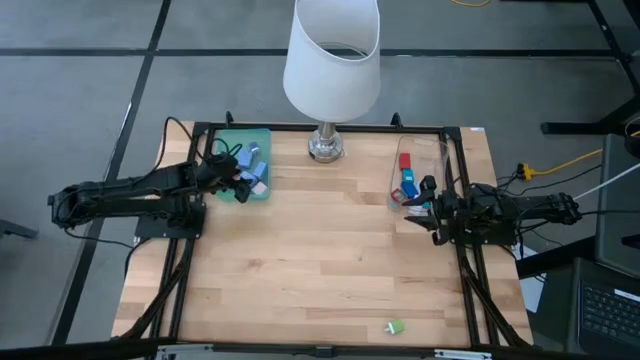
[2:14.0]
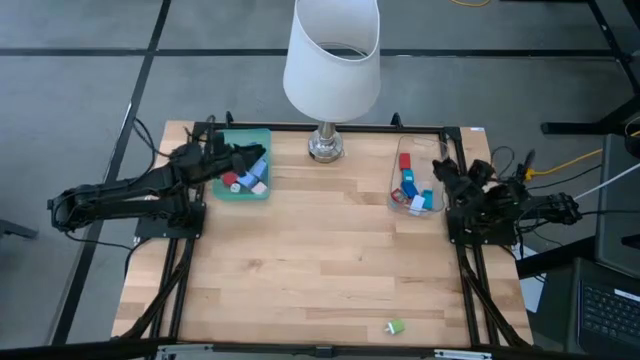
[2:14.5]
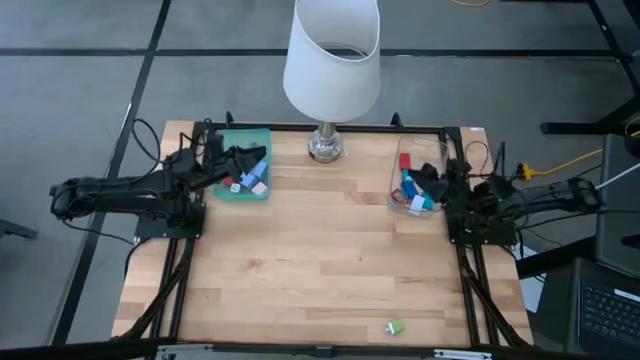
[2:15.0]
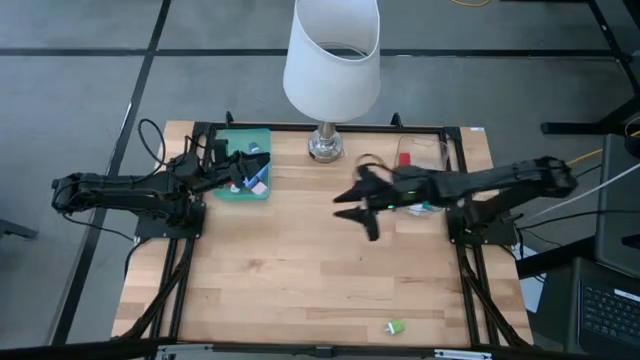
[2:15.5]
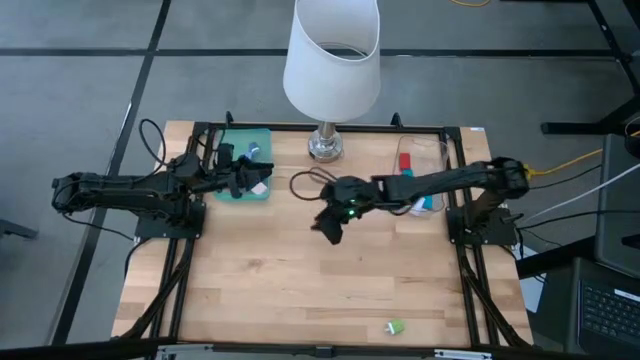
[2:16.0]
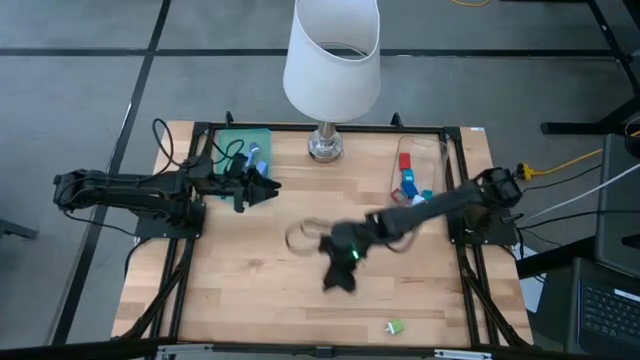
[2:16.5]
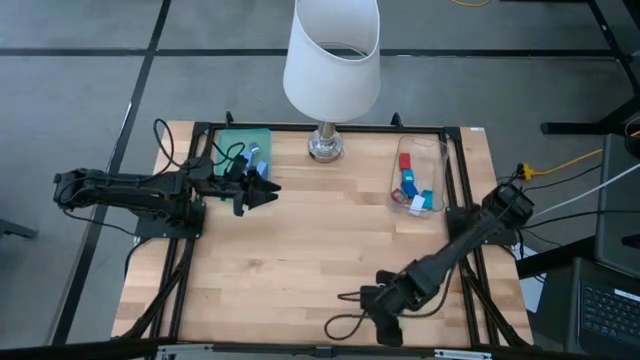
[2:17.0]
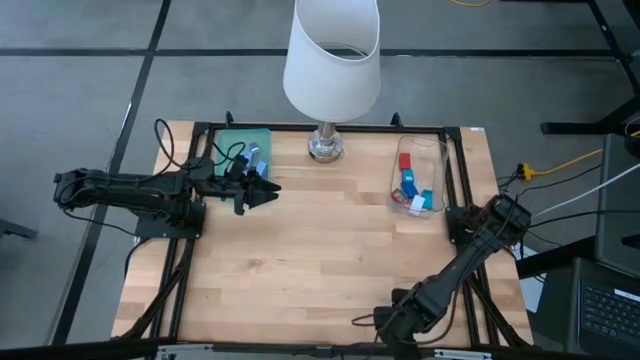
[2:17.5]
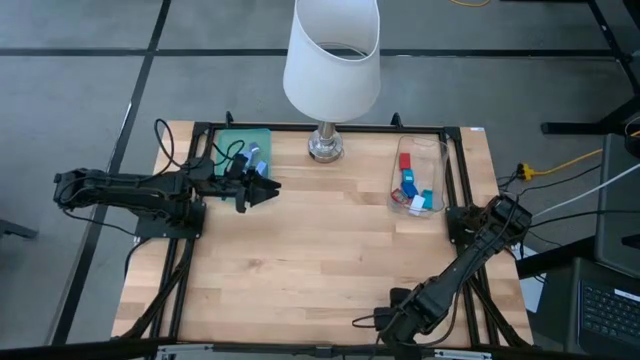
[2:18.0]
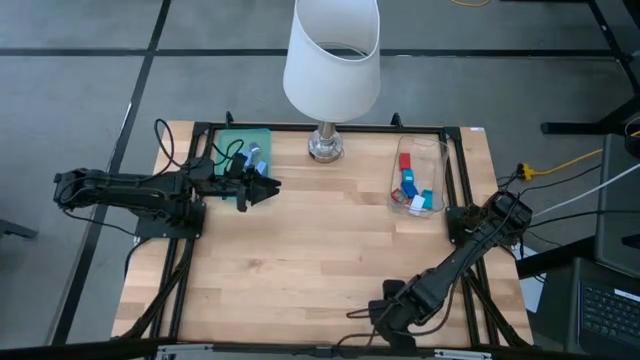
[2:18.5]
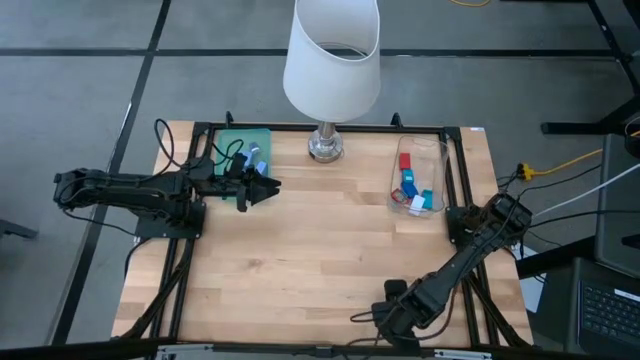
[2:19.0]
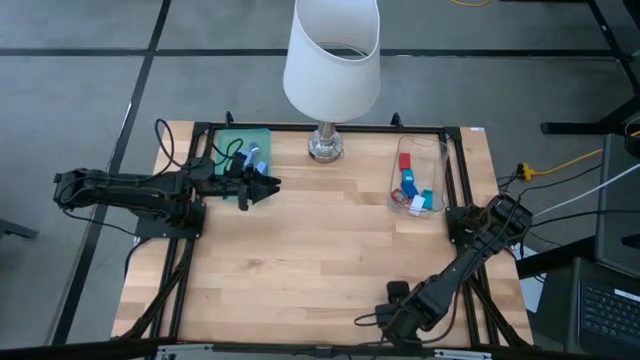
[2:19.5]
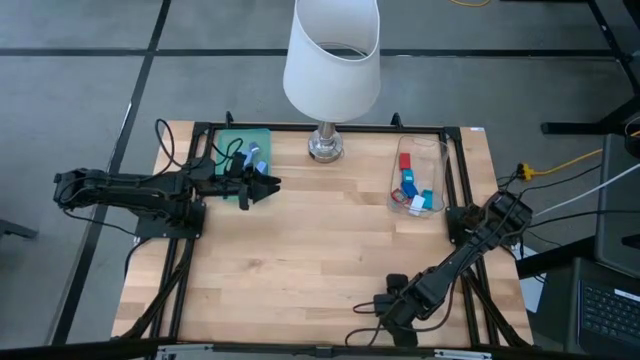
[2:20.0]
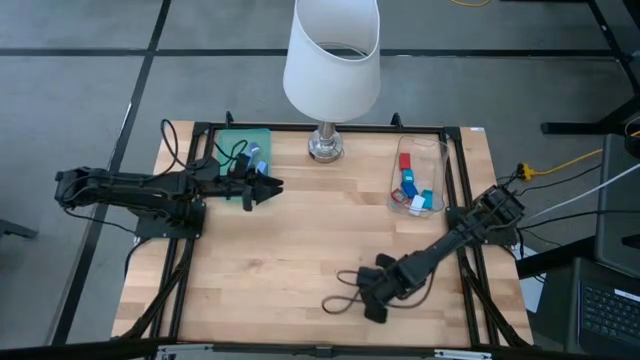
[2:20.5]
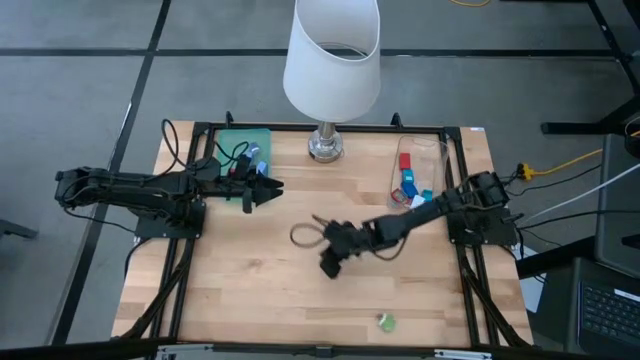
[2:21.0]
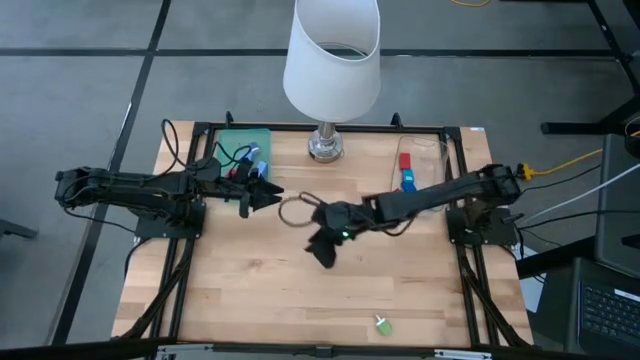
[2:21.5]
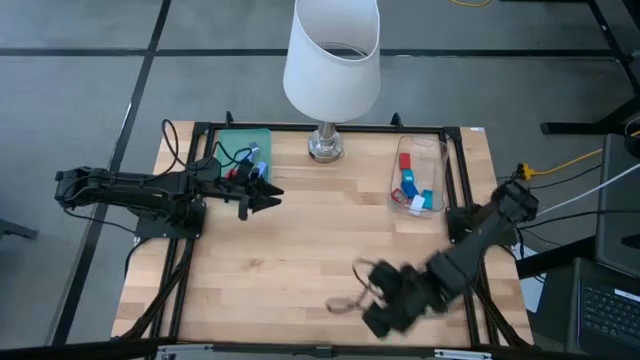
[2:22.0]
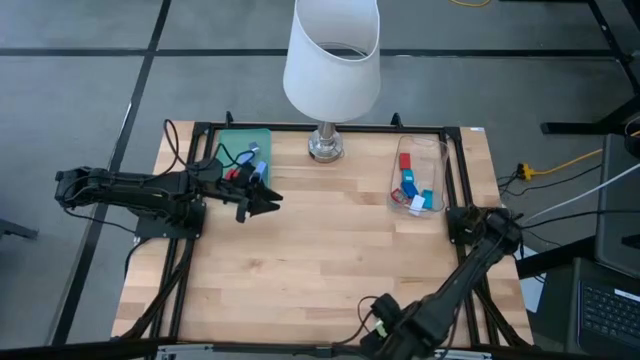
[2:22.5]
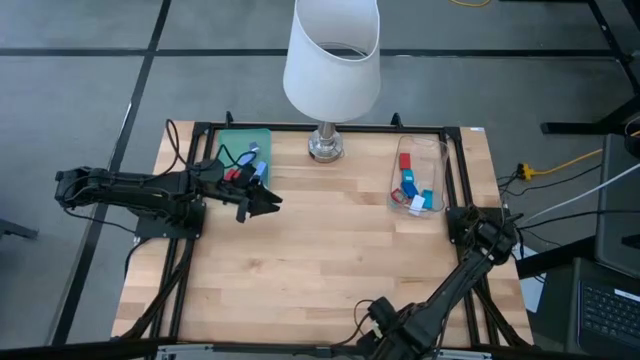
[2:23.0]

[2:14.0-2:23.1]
Task: Pick & Place Office items
Put the green charger adapter into the green bin

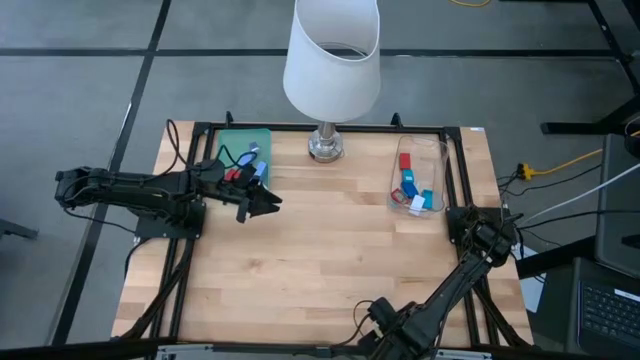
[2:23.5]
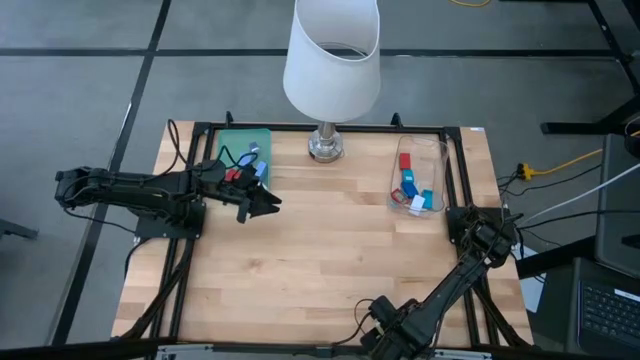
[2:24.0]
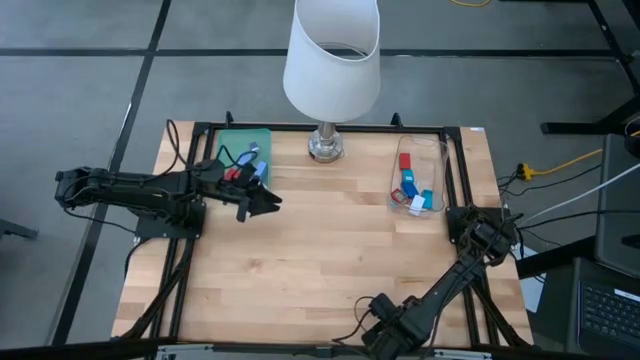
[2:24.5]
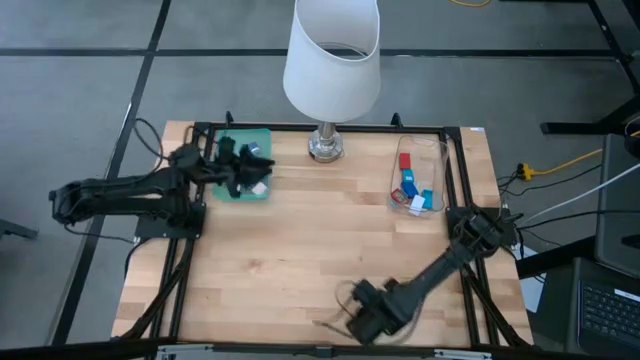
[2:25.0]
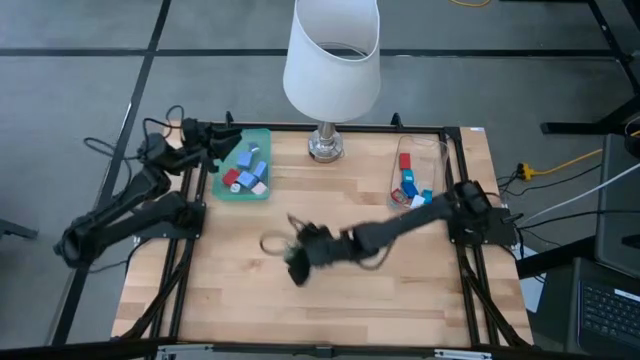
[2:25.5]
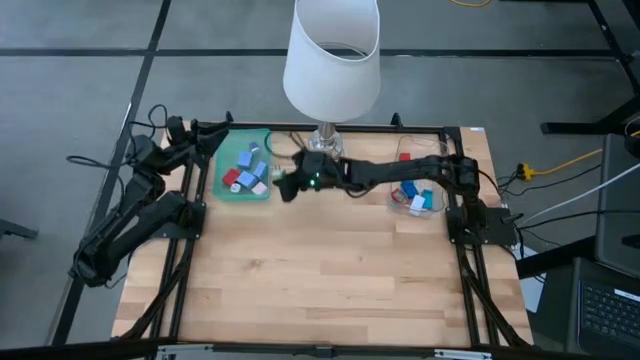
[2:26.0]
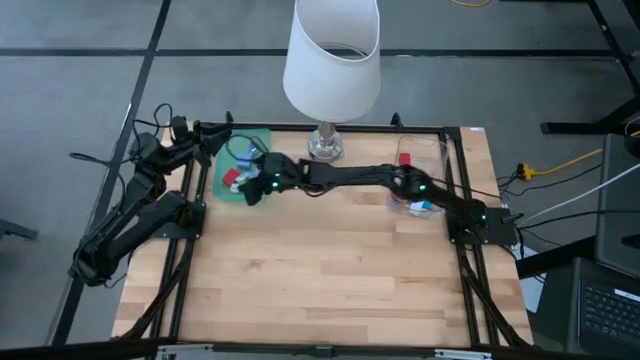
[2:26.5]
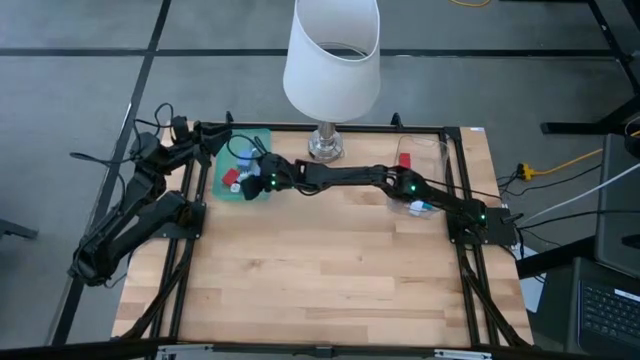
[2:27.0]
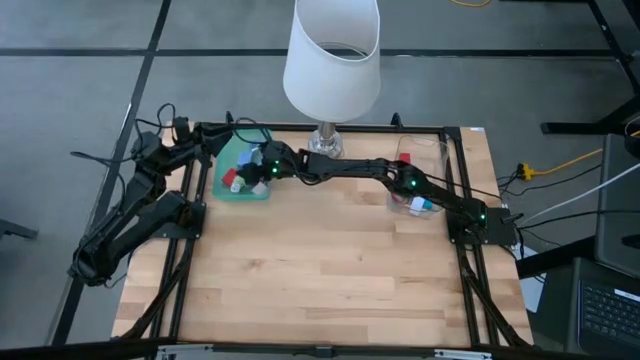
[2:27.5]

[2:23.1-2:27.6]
Put the green charger adapter into the green bin

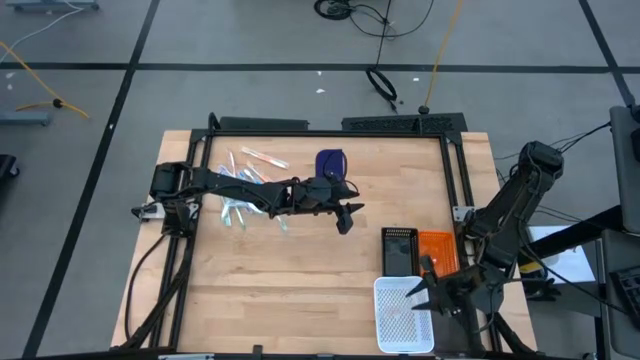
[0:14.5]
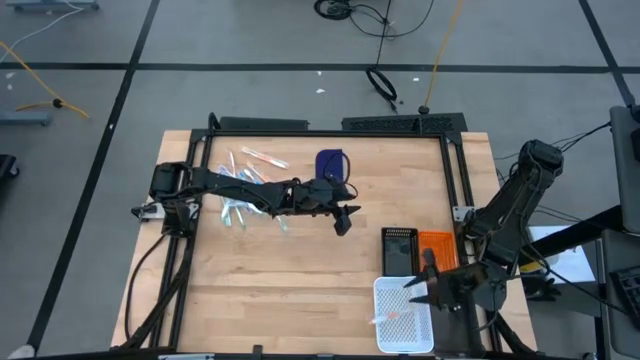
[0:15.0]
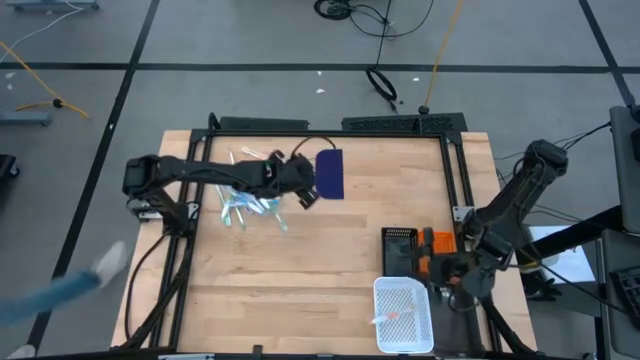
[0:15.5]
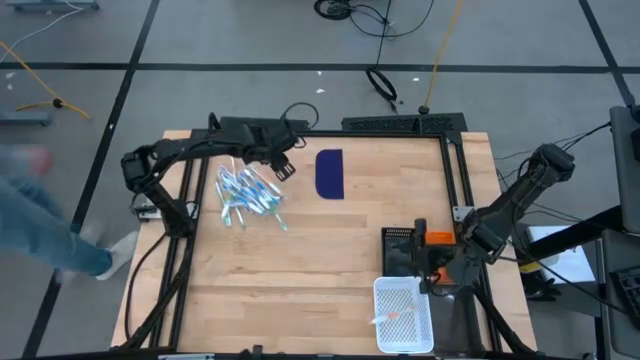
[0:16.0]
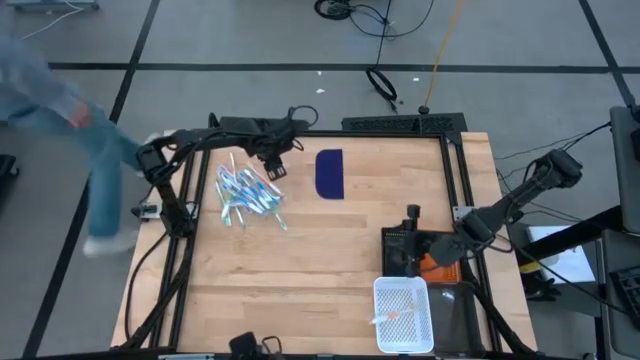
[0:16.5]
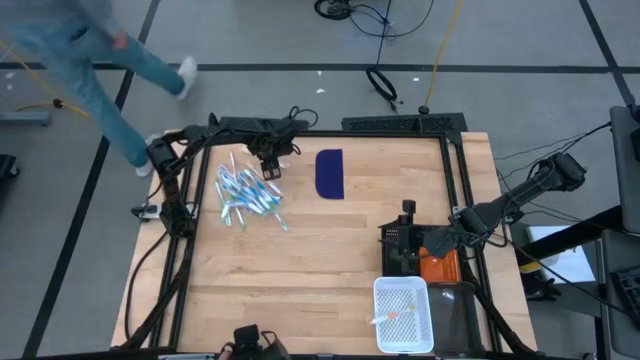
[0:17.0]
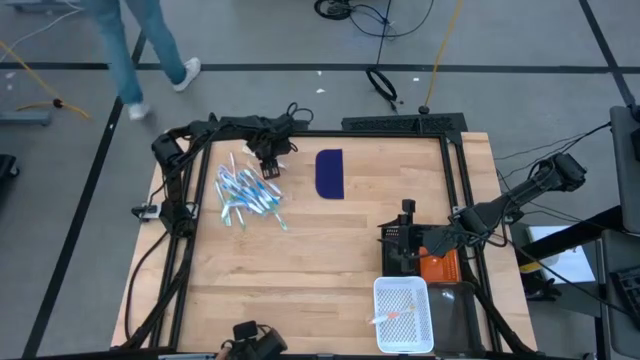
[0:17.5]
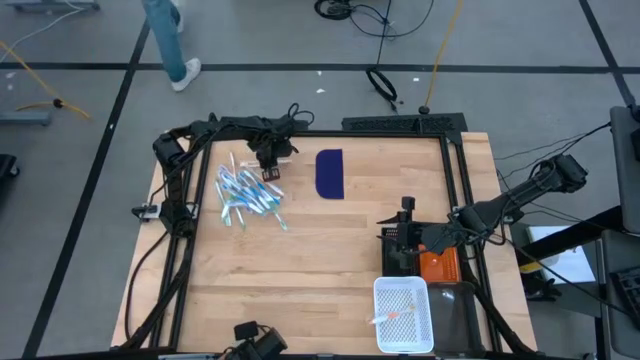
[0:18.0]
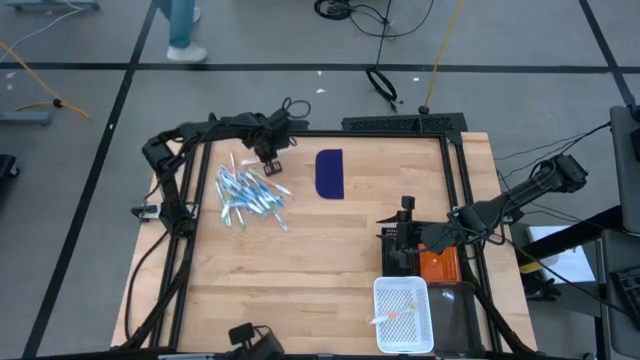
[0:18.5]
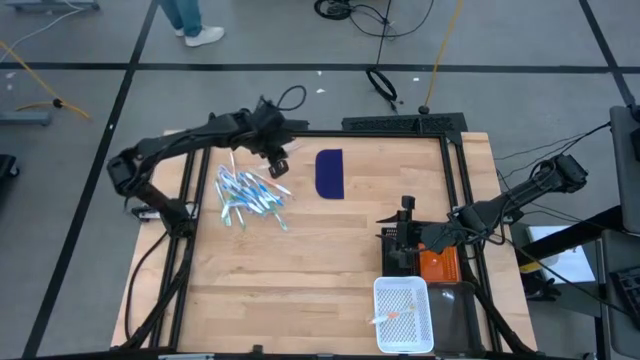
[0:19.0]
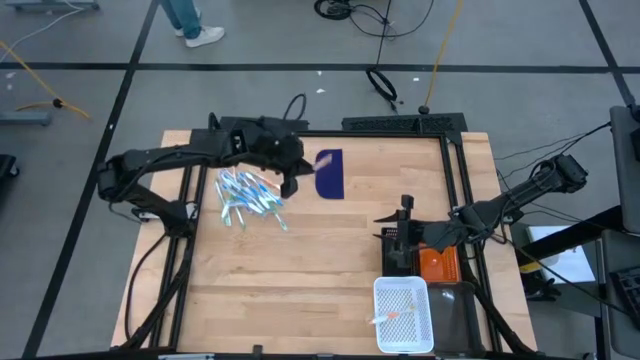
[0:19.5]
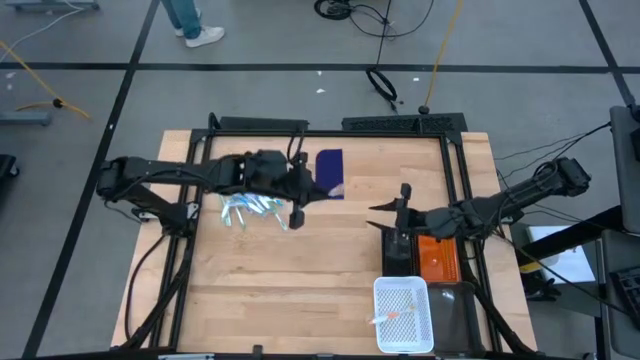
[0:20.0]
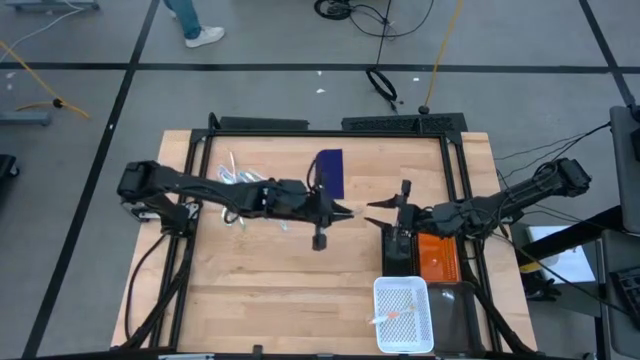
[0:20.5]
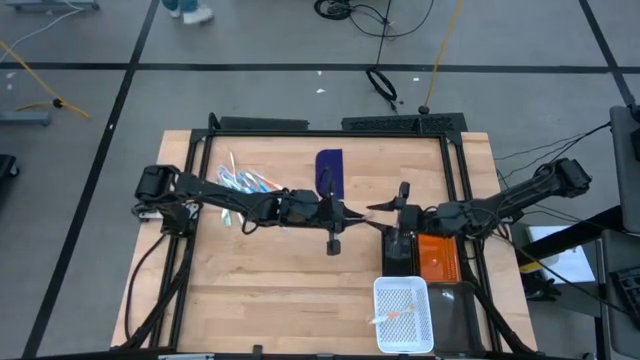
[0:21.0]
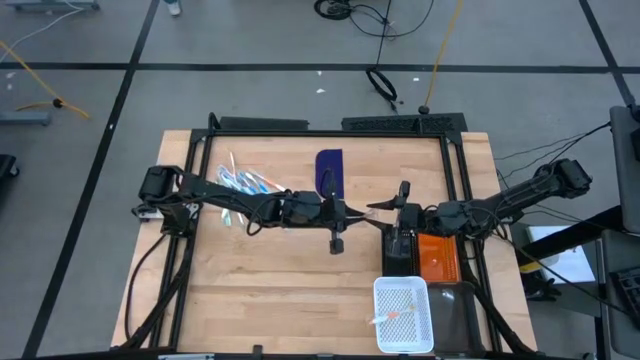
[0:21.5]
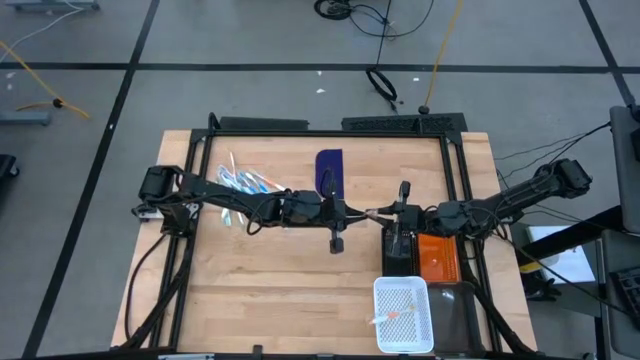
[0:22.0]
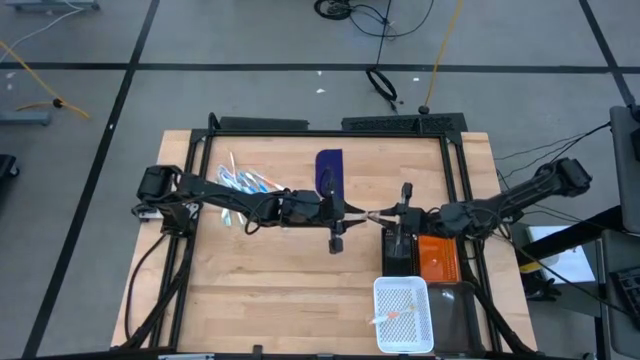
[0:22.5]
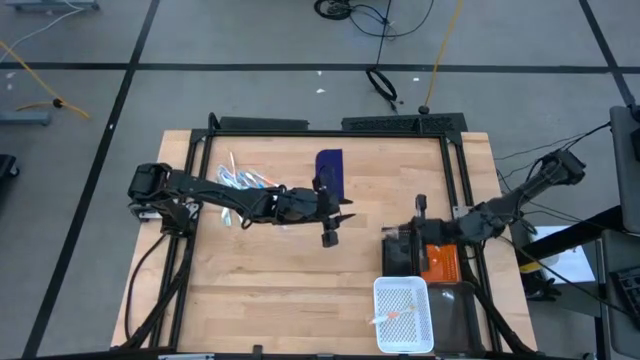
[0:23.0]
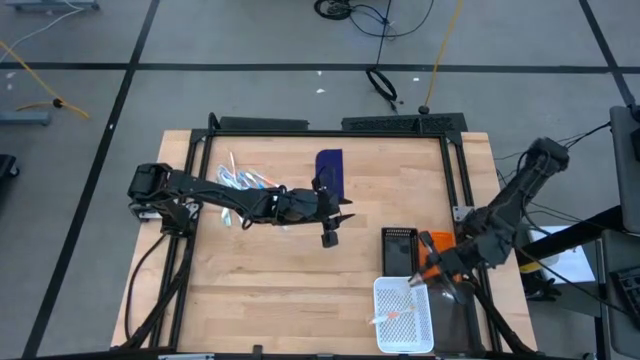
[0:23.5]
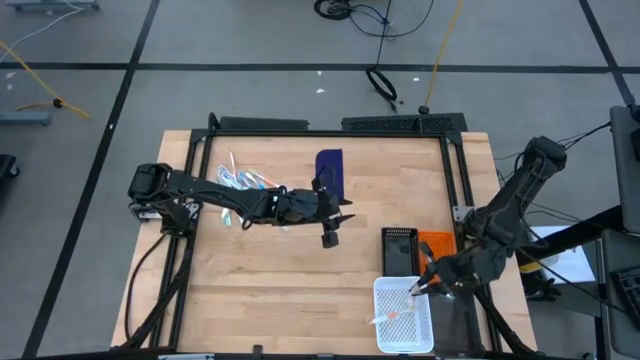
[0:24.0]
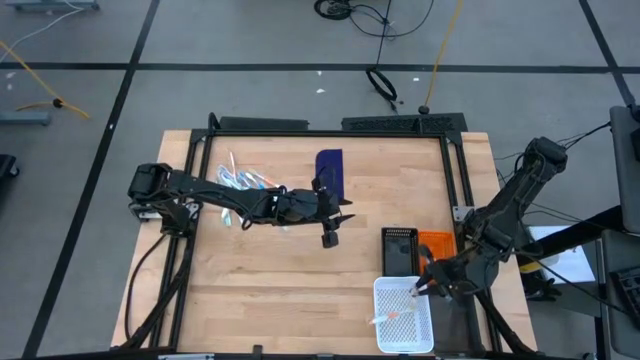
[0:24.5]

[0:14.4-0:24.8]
Task: Pick & Place Toothbrushes
Put the orange toothbrush into the white bin
